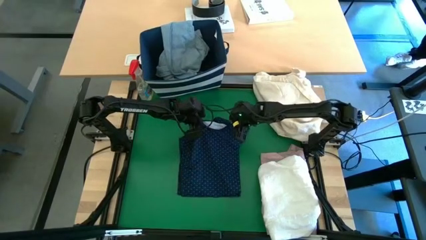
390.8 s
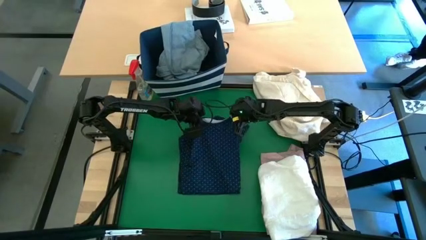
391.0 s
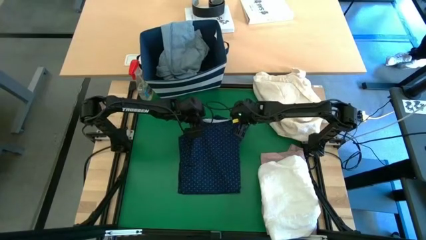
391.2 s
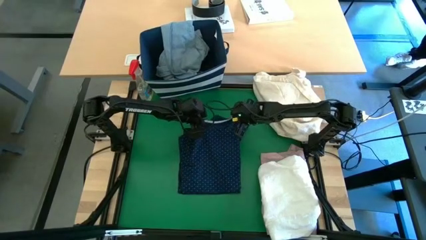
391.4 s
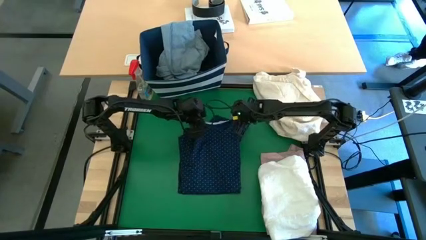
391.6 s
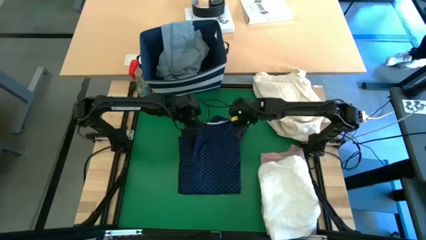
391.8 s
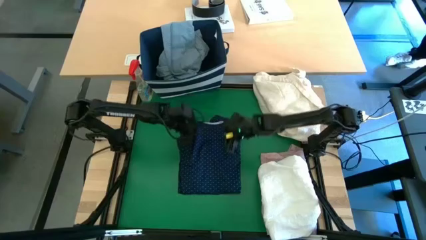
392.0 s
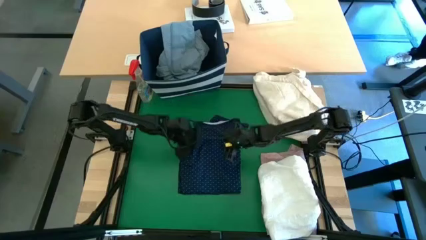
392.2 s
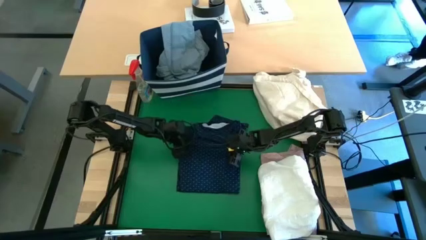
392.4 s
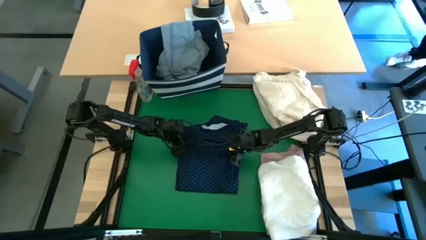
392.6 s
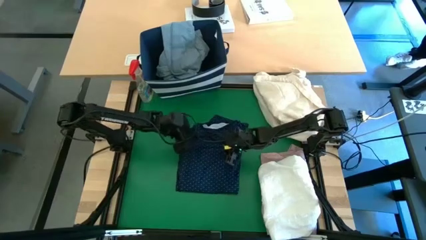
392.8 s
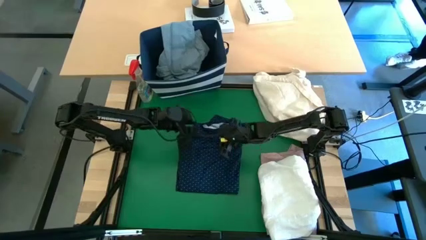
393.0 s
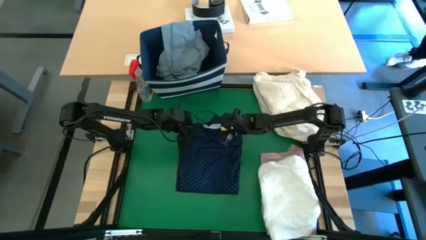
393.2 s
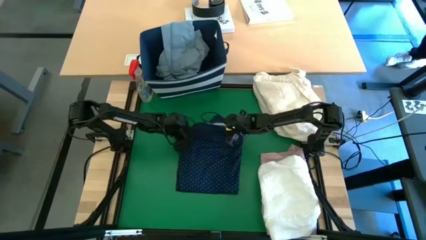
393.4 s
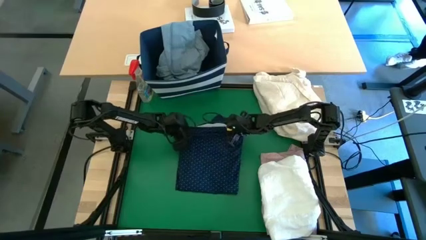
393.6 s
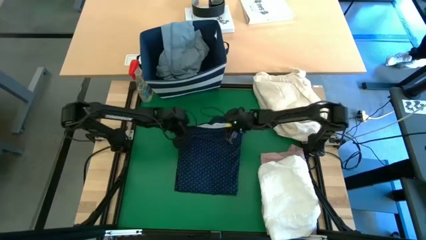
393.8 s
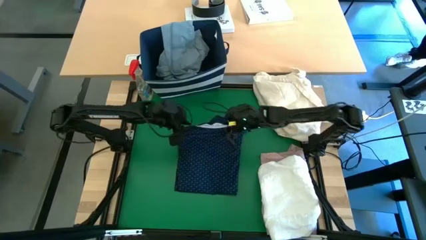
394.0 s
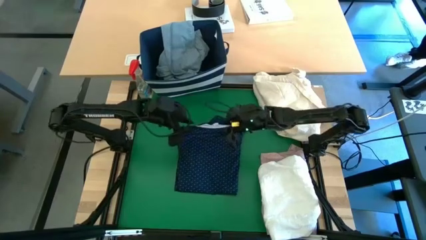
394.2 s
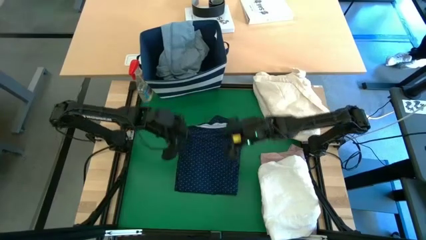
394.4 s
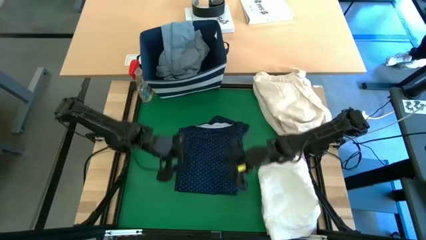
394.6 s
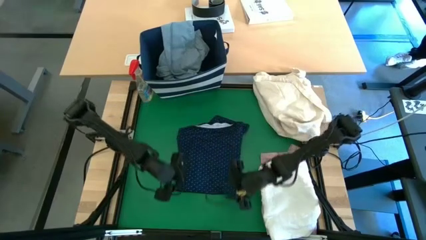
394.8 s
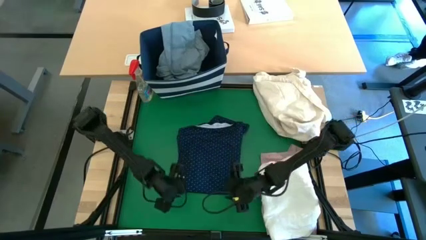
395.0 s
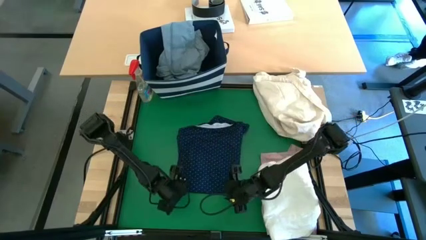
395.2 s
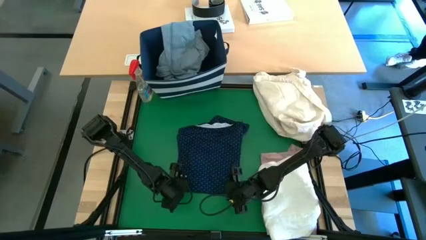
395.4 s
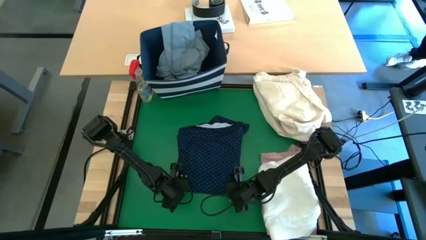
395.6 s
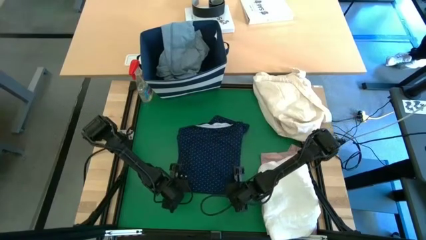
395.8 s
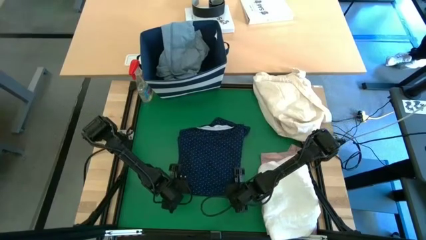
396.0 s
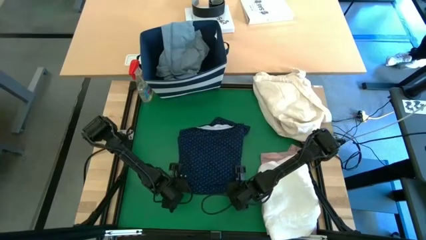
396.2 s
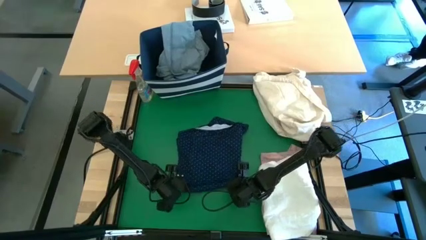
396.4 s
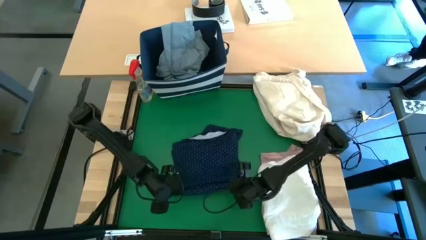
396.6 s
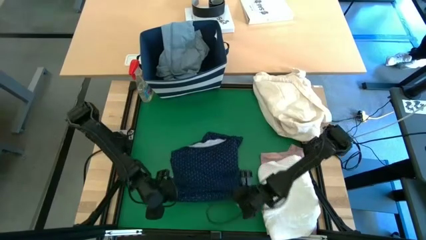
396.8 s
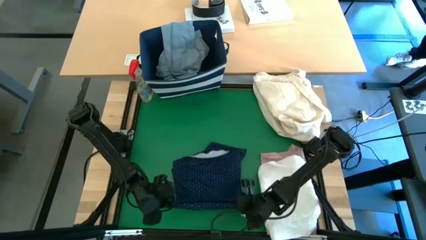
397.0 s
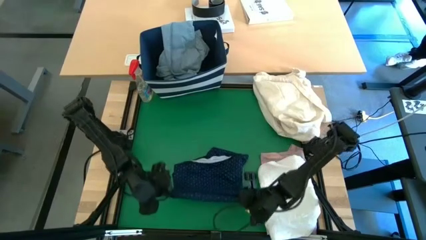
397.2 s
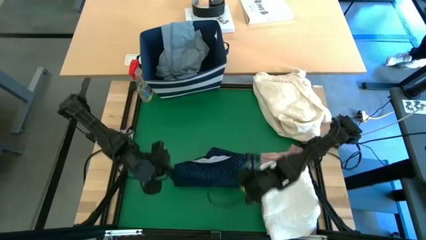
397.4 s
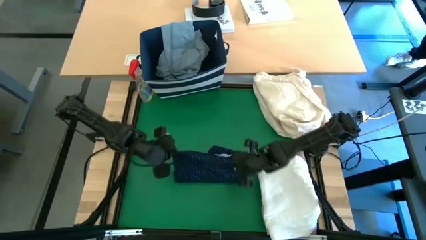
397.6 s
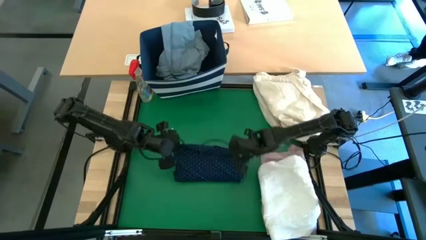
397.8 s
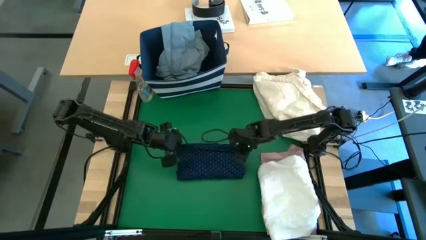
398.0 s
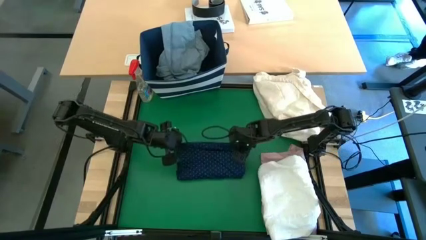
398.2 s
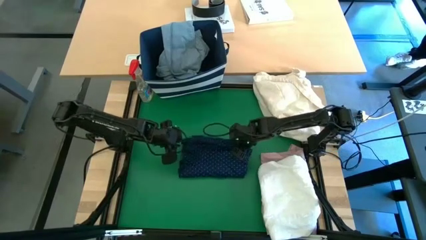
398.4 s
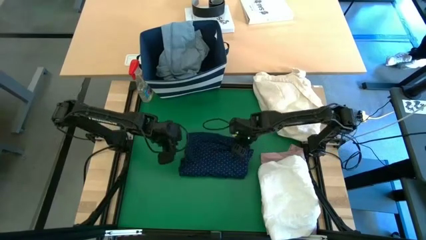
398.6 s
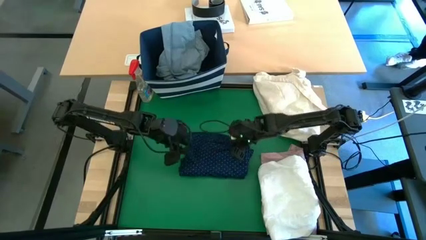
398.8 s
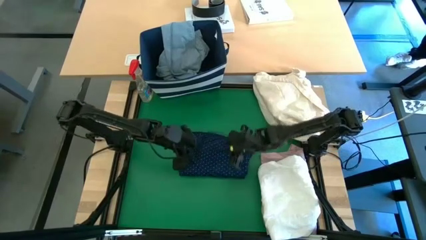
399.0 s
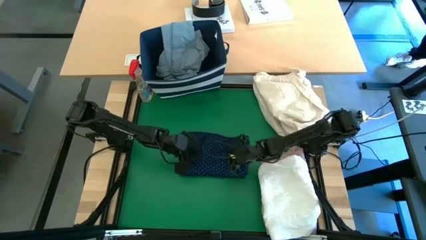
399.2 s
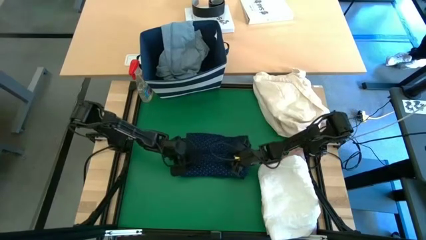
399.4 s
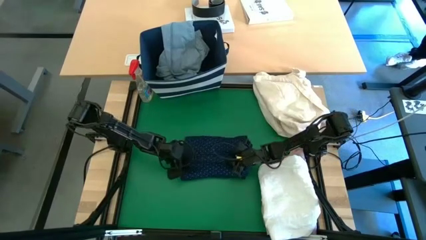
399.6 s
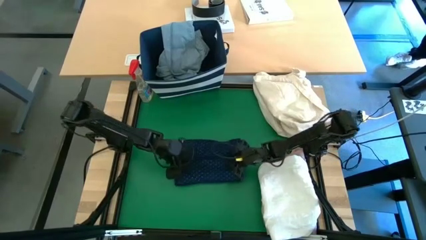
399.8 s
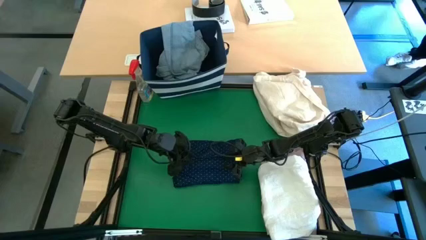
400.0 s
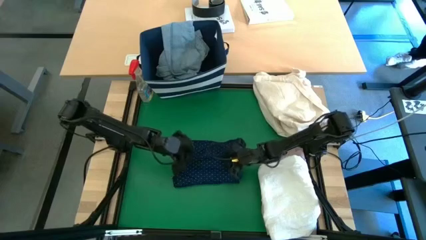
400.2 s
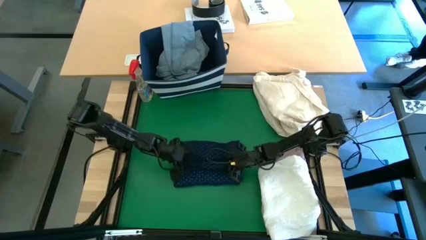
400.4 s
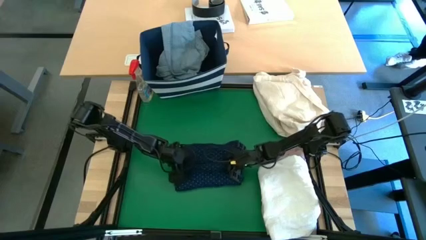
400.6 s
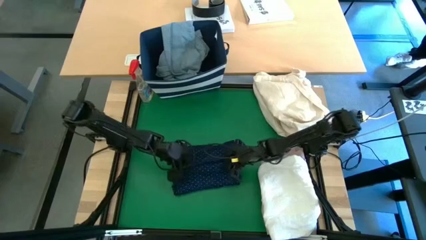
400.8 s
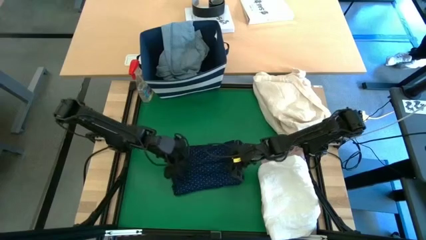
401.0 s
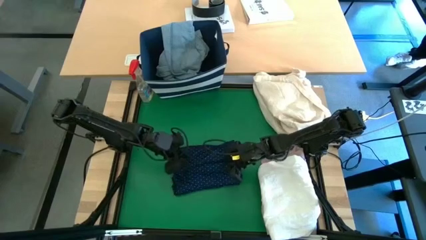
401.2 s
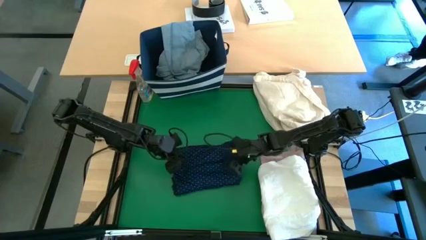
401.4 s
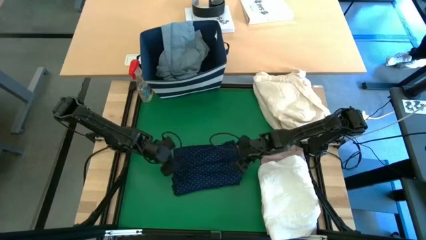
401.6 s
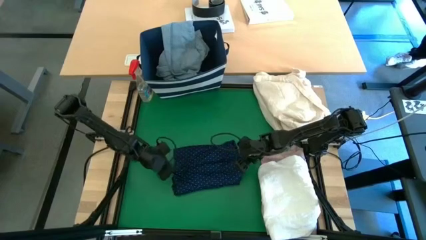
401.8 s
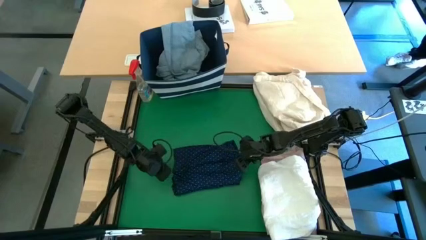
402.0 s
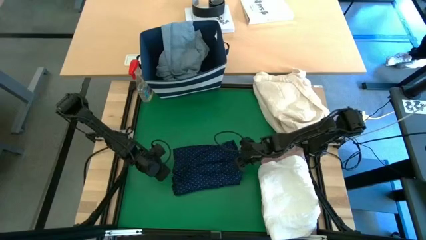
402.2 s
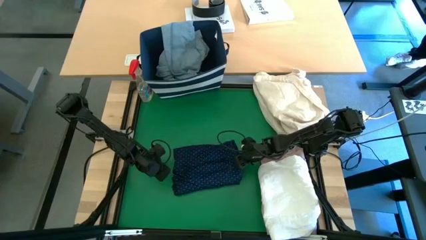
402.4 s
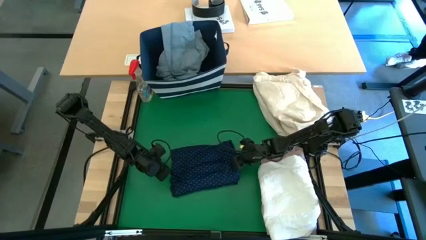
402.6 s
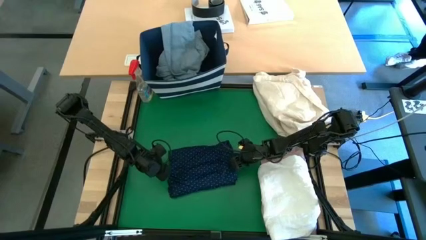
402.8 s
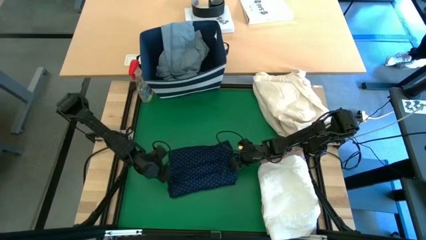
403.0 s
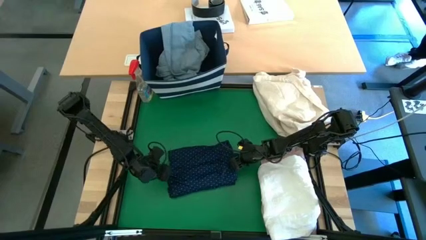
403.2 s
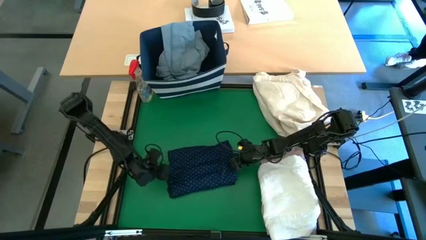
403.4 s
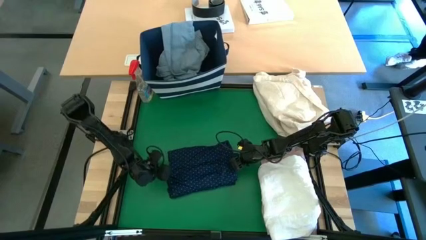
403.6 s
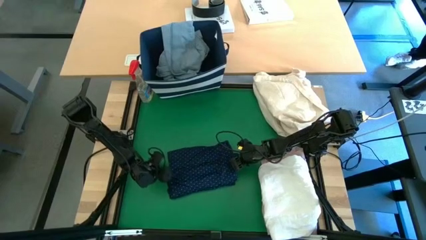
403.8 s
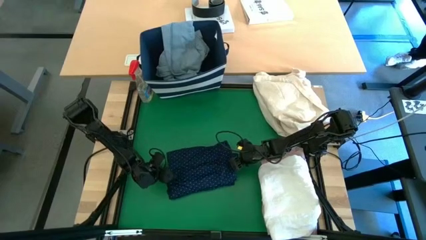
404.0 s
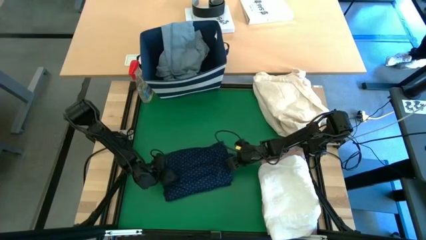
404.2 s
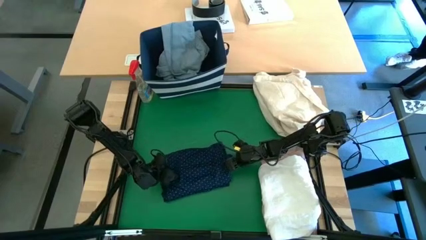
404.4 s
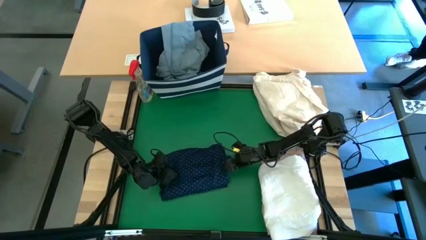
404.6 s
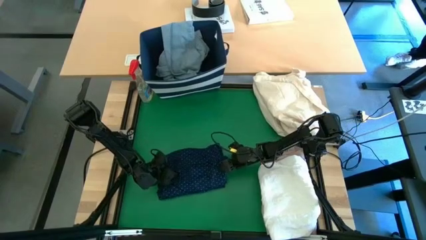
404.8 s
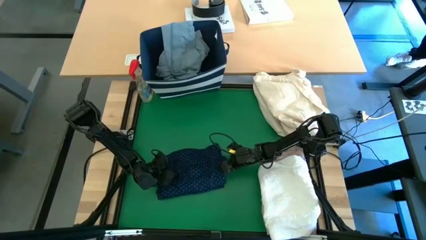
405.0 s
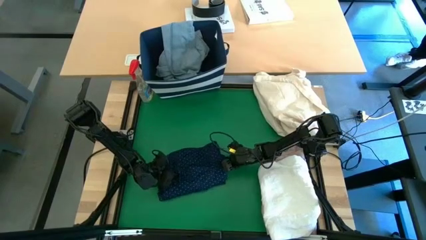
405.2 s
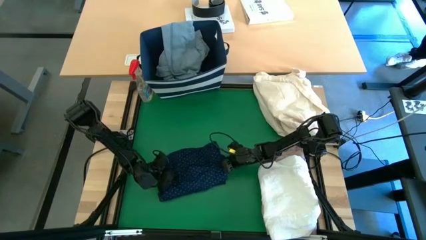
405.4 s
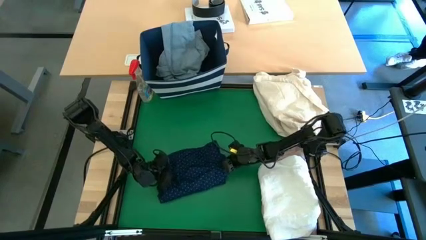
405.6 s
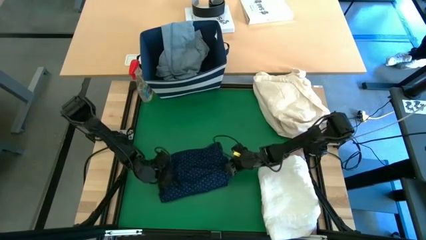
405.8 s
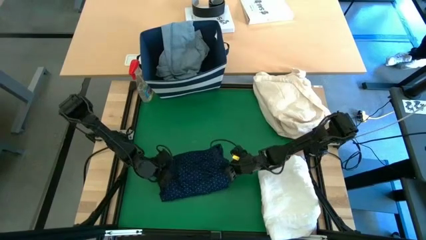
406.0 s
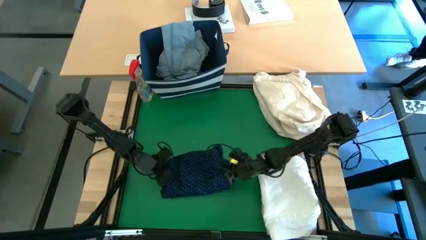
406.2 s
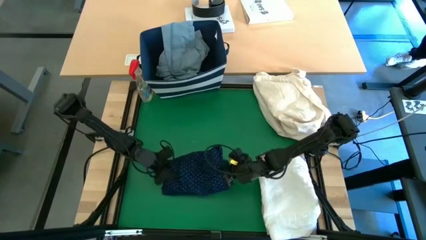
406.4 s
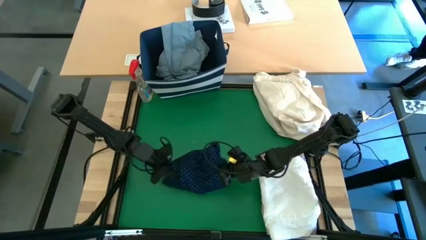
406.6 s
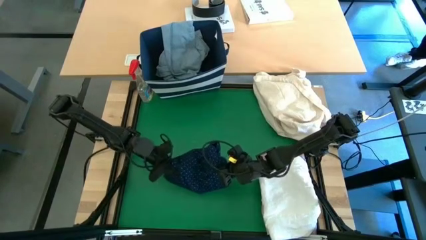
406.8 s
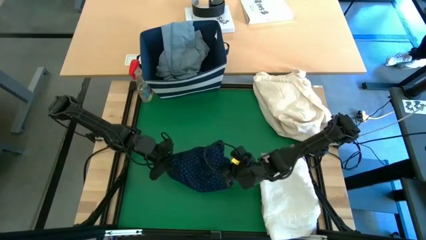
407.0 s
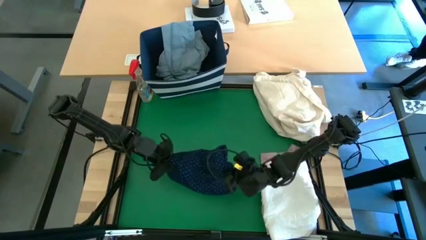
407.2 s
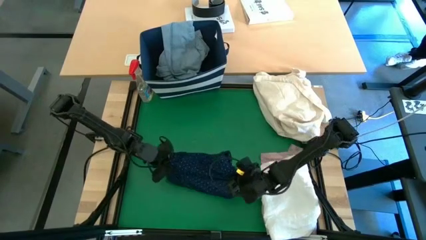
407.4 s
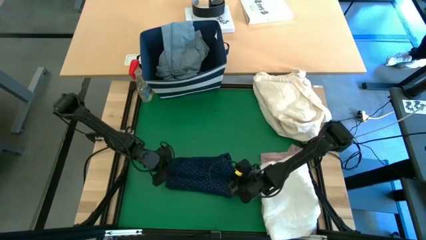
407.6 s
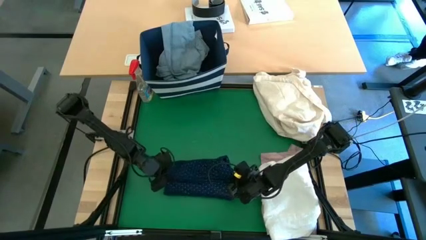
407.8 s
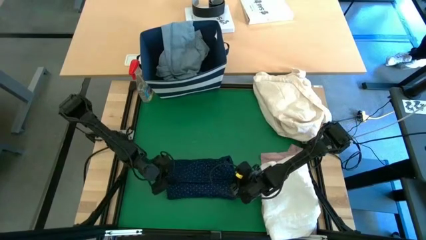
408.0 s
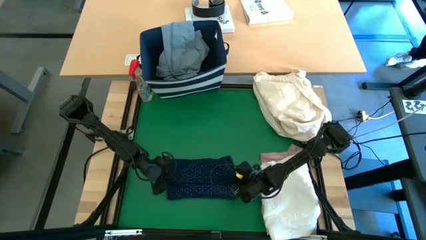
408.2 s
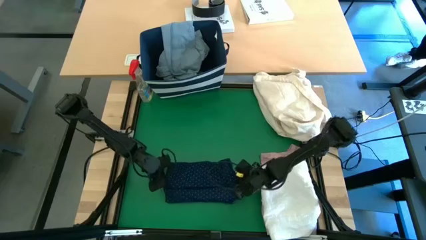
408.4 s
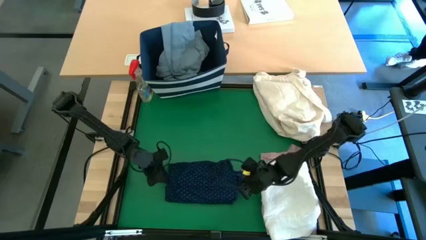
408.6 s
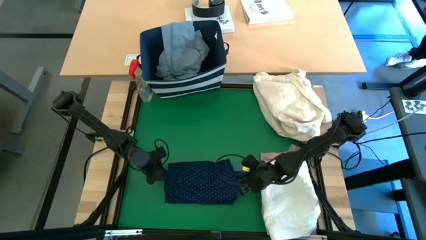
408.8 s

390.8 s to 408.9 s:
Task: Fold laundry
Fold the blue polo shirt
